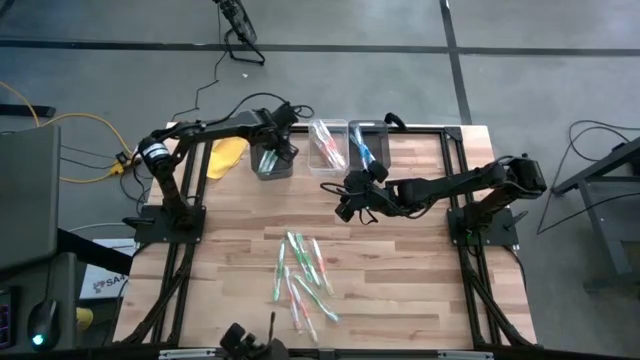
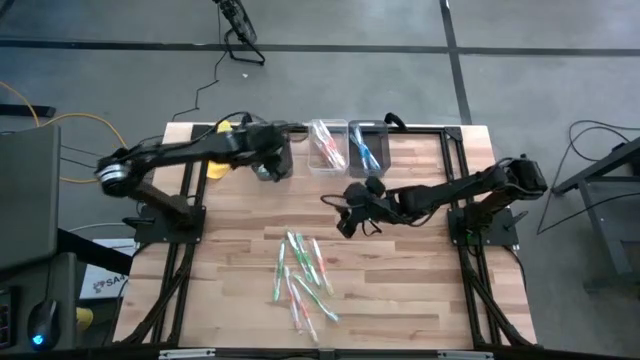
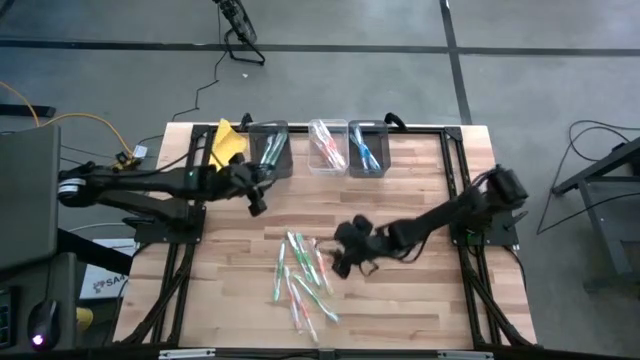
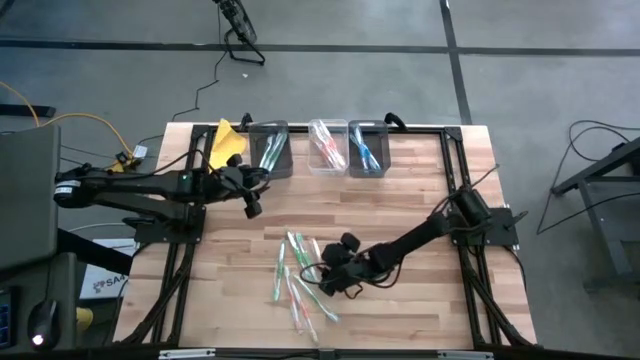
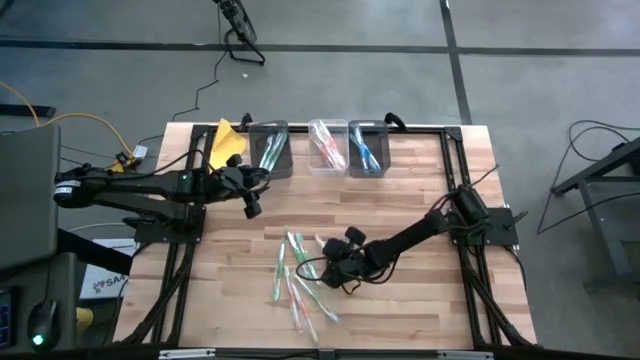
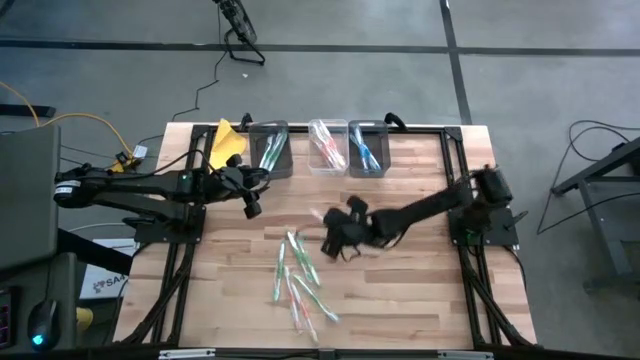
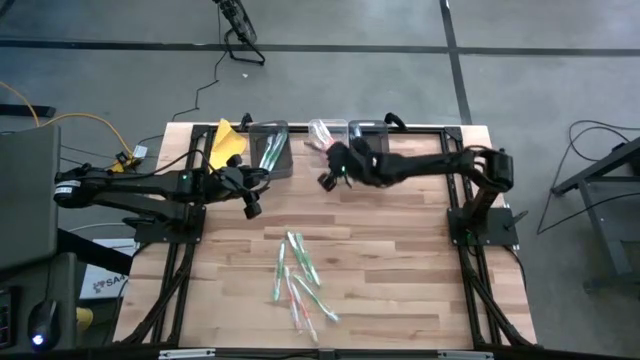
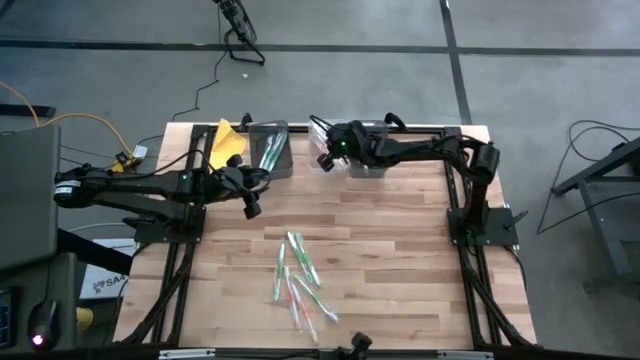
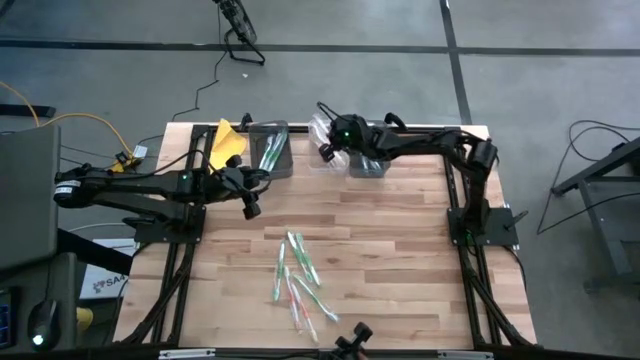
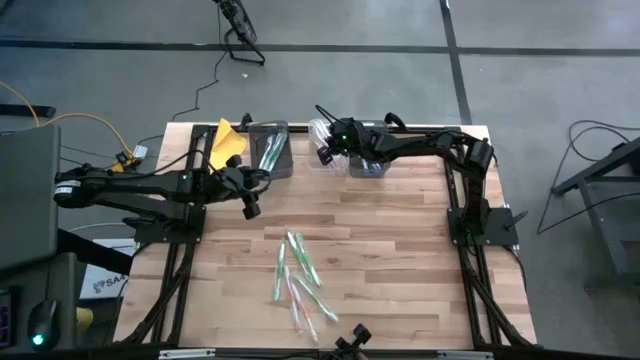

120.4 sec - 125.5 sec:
Task: Pick & Place Toothbrushes
Put the orange toothbrush into the transparent bin

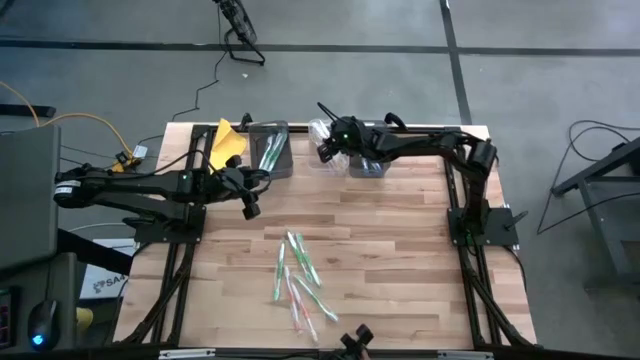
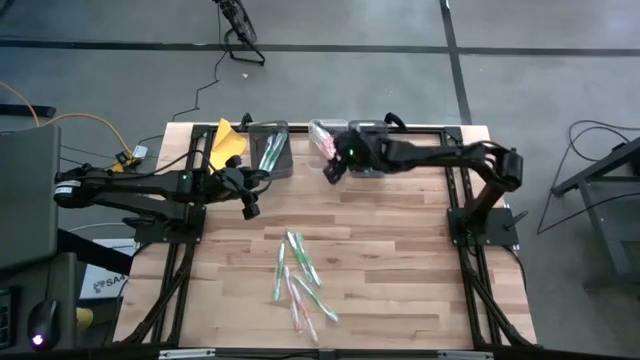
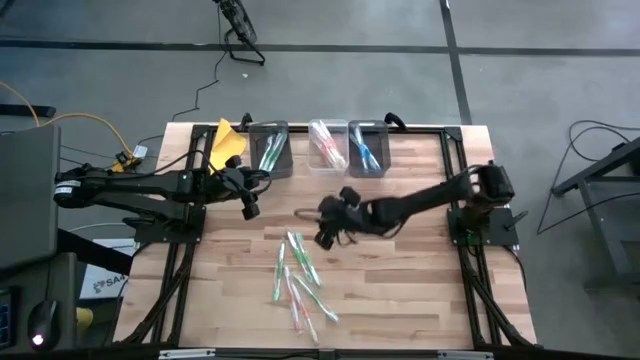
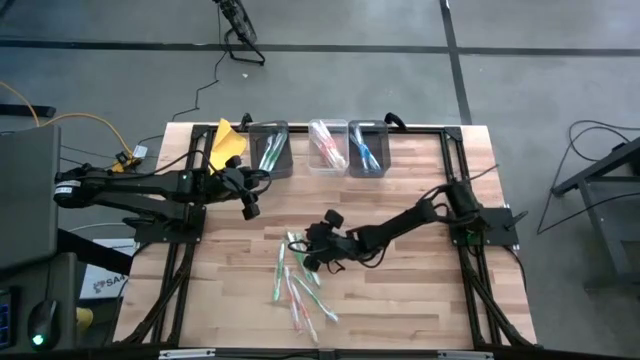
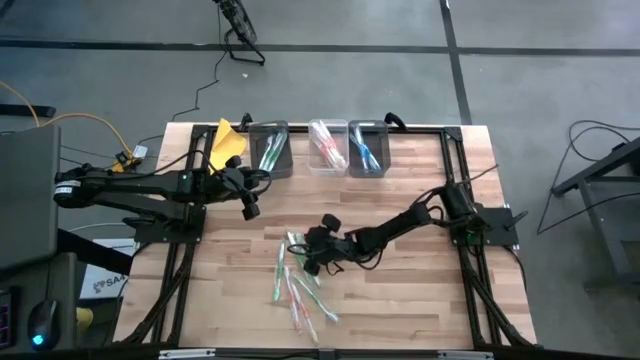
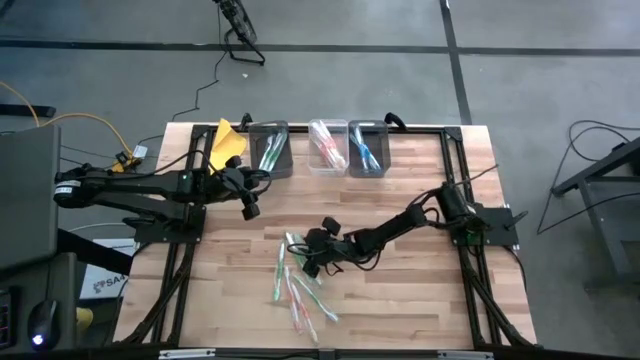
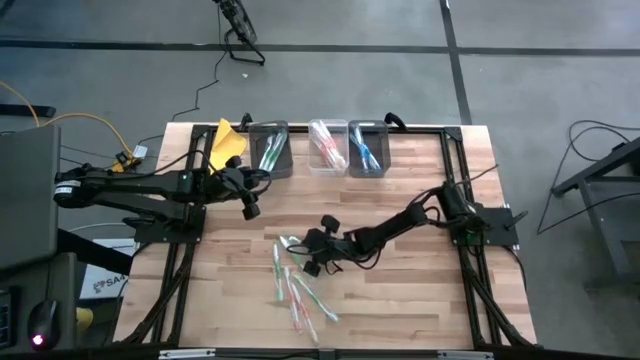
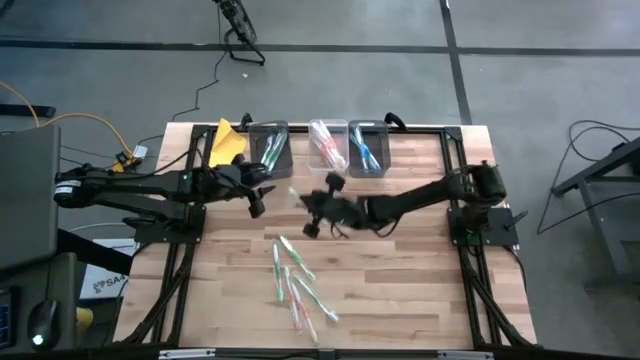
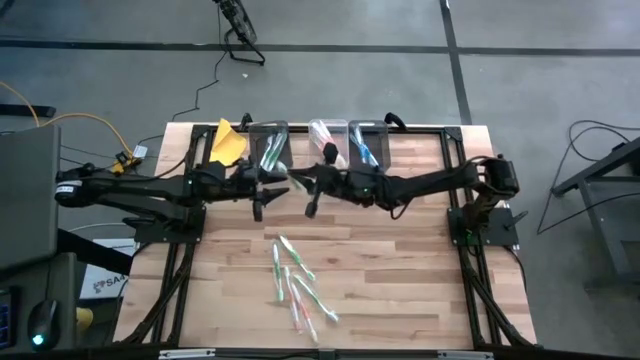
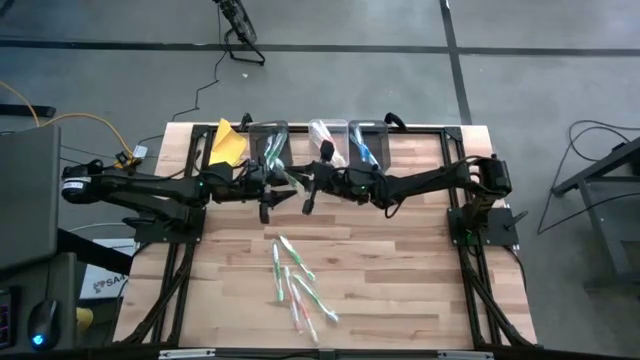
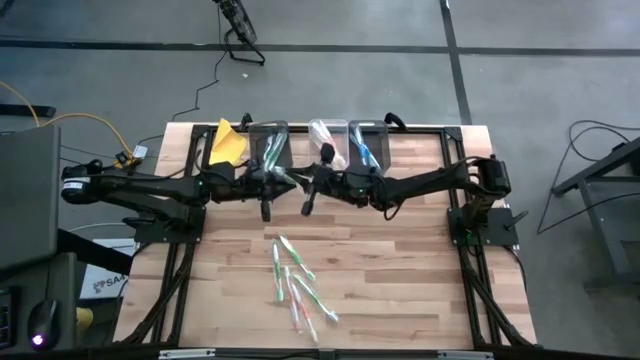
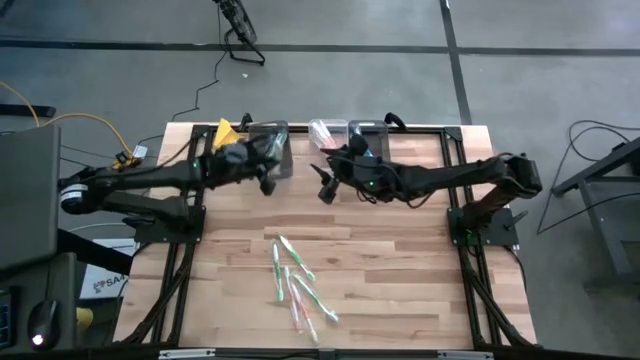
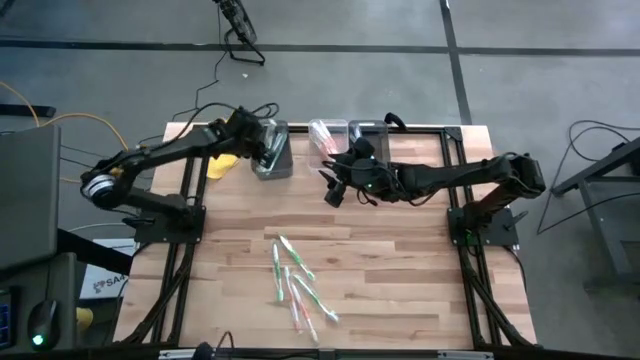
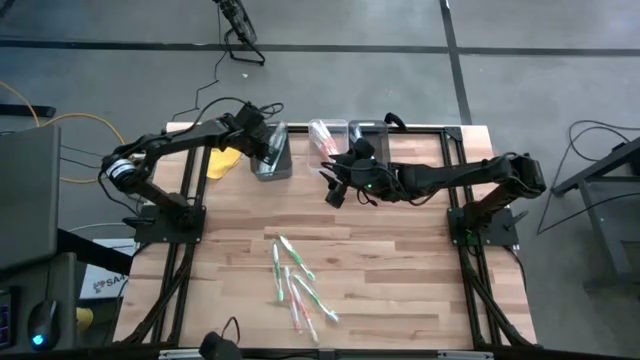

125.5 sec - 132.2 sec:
Put the green toothbrush into the left black bin

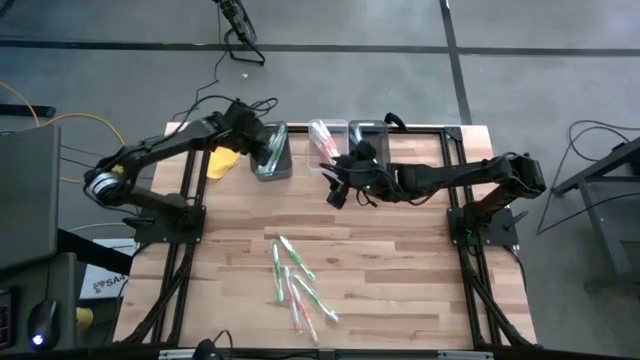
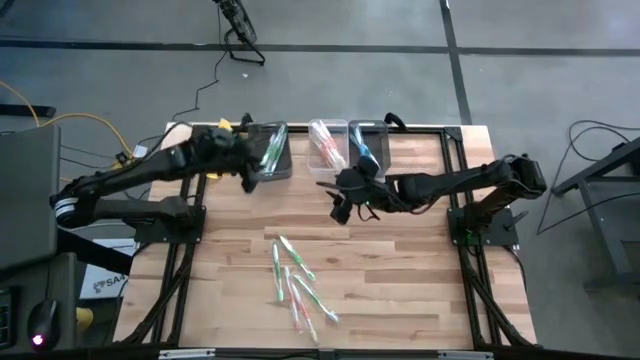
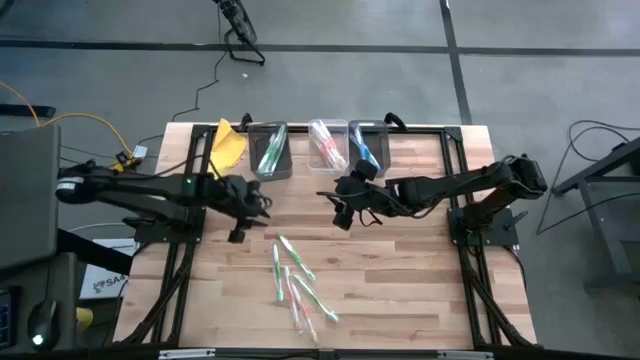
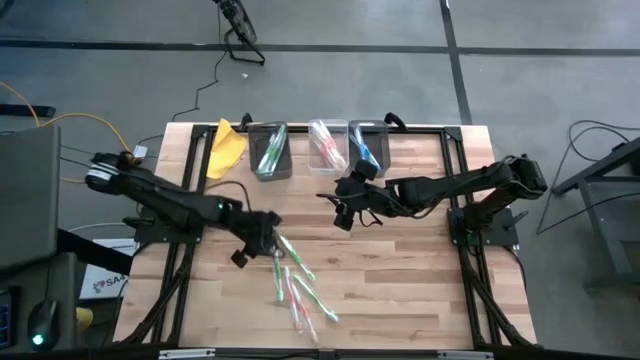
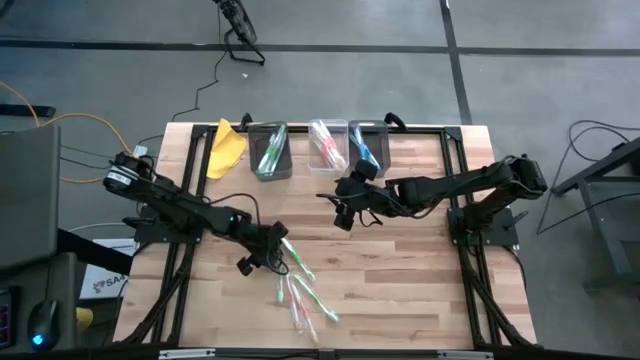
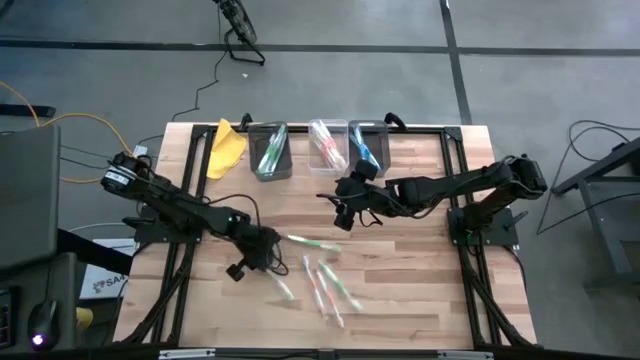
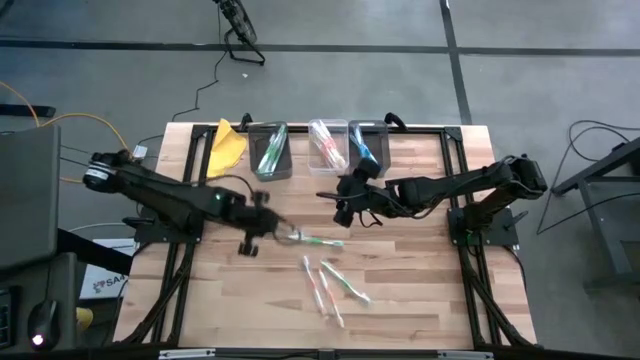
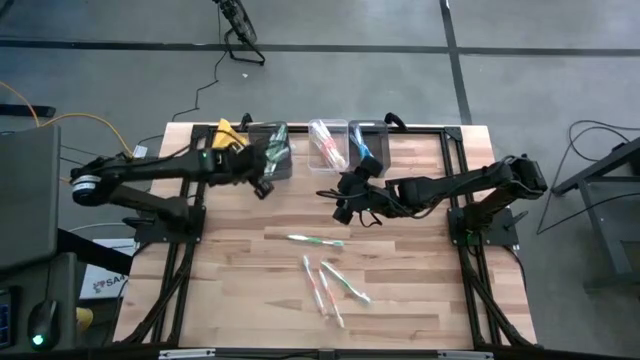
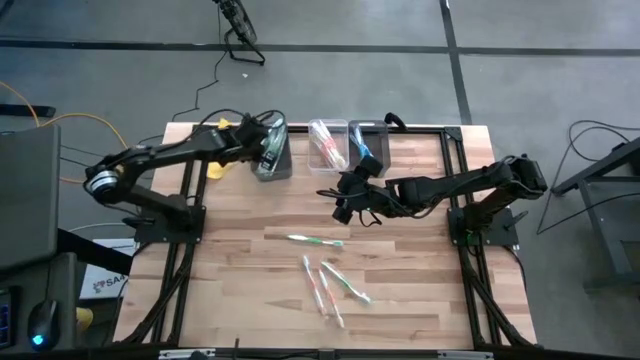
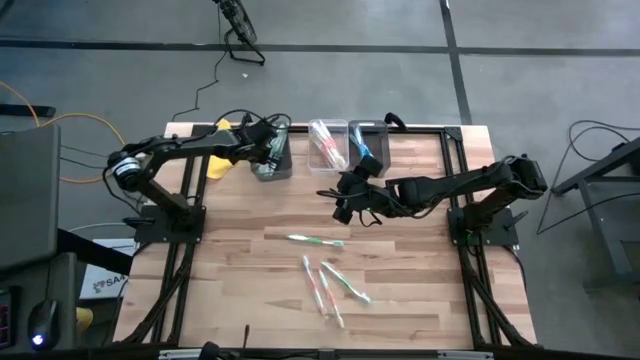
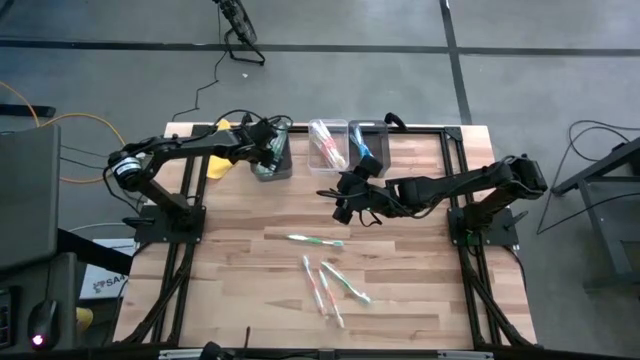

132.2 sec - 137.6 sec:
Put the green toothbrush into the left black bin

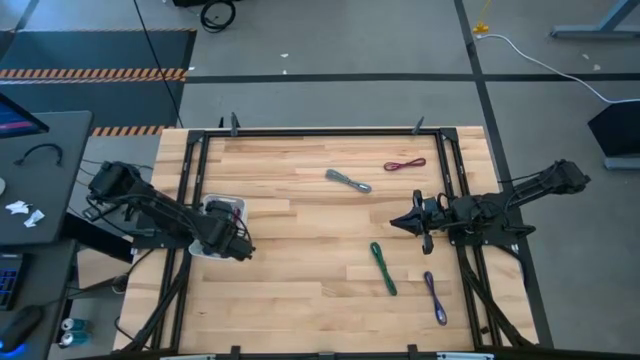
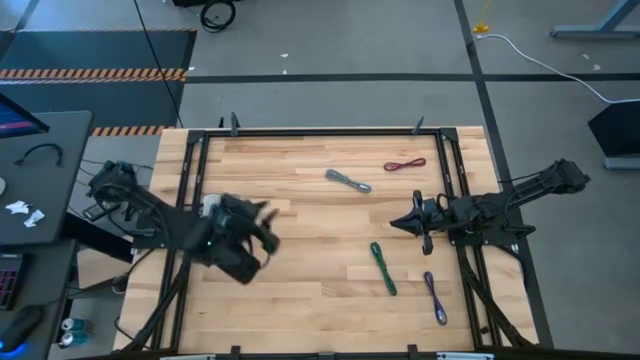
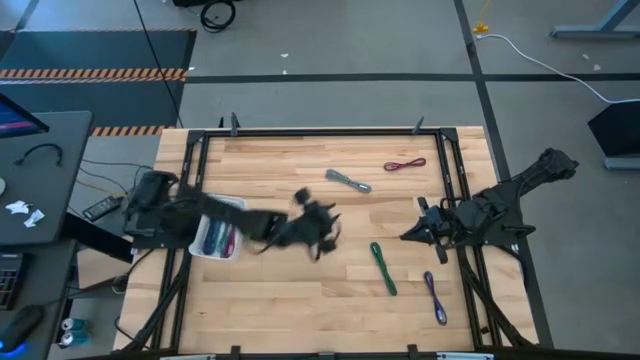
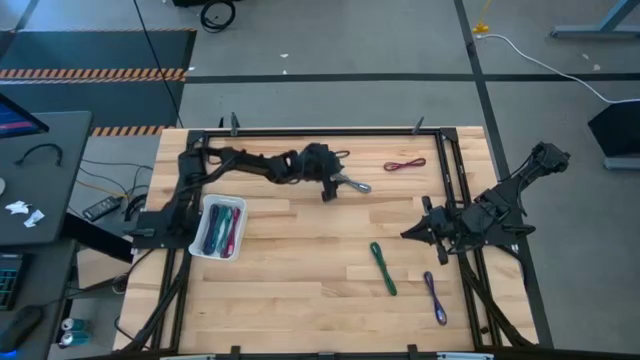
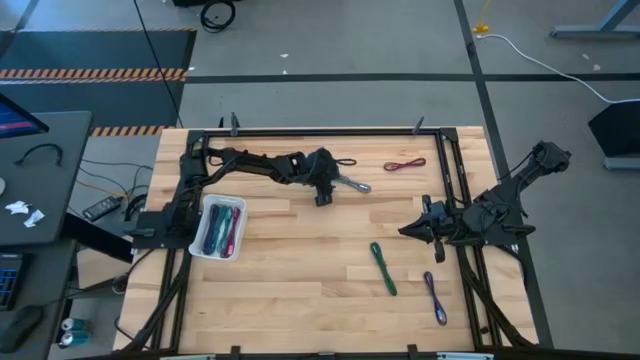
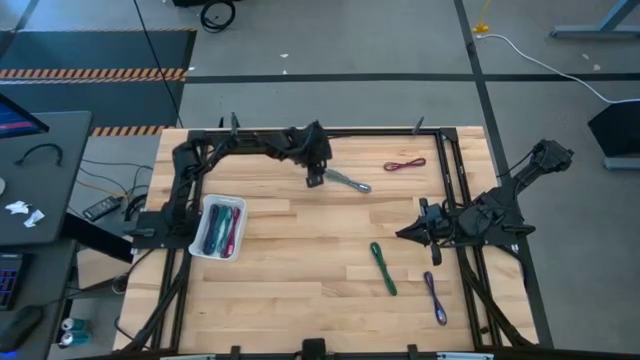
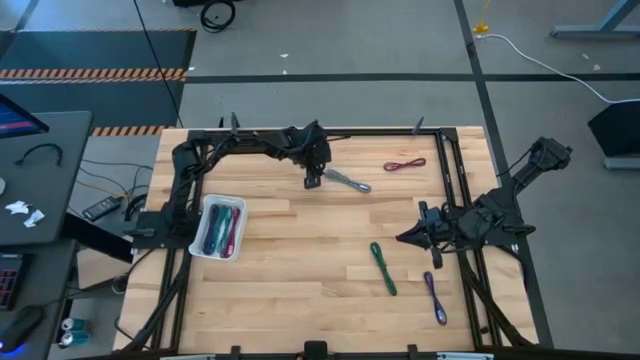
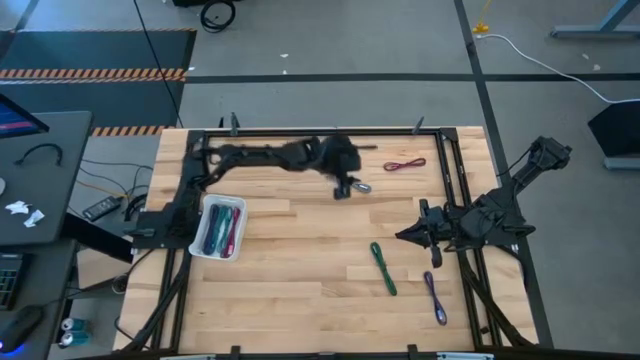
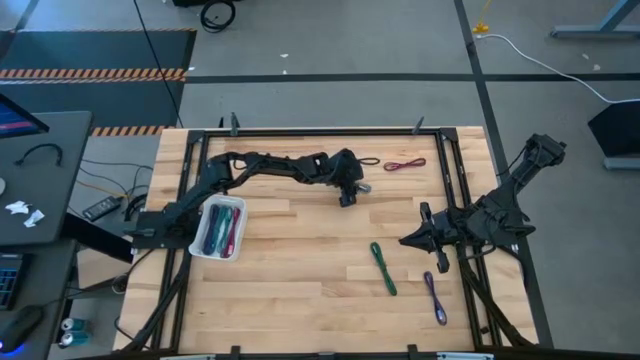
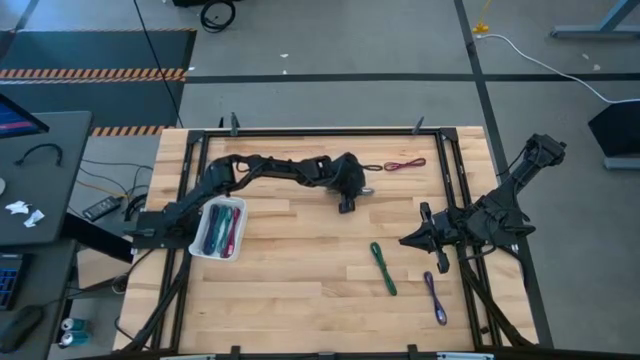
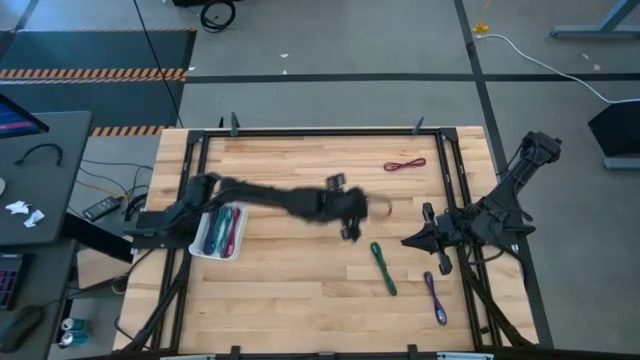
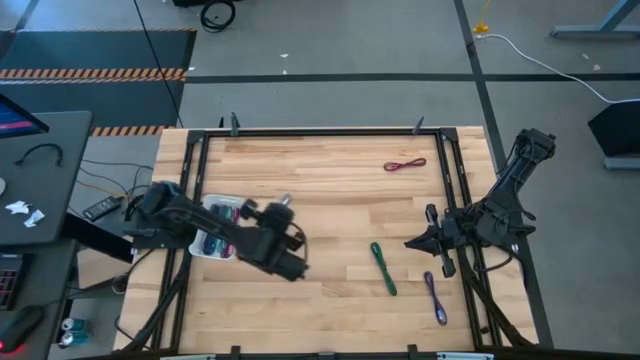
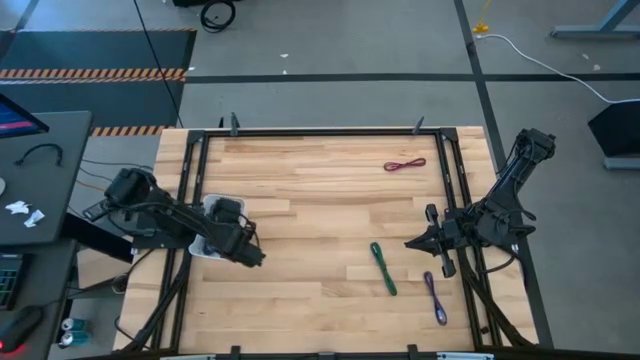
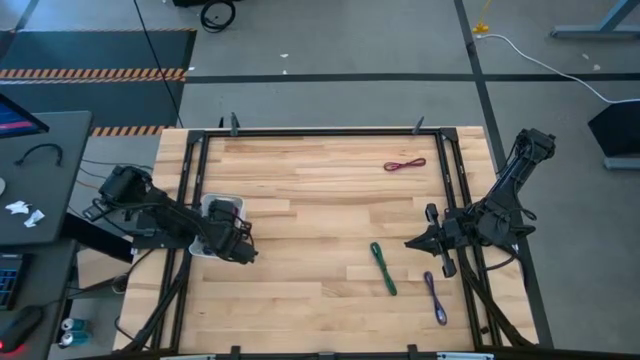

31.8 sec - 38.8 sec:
Task: Pick and place USB-C Cables
Put the gray charger cable into the white bin
